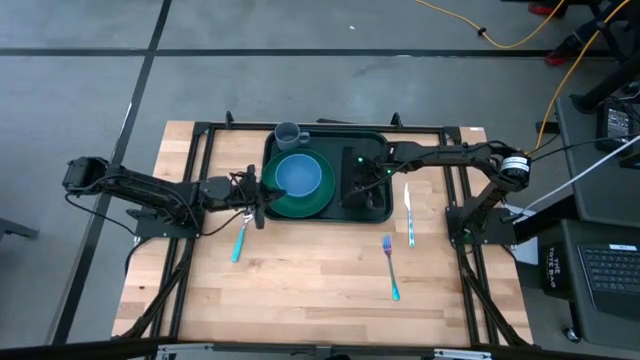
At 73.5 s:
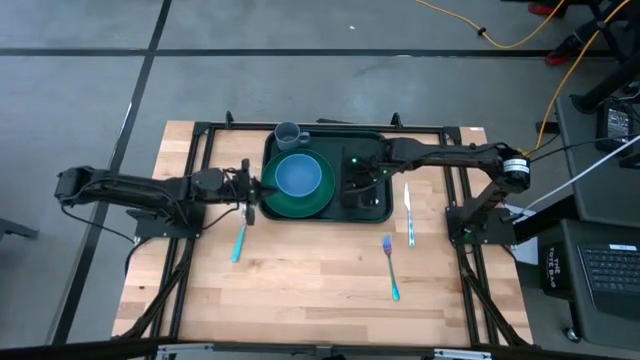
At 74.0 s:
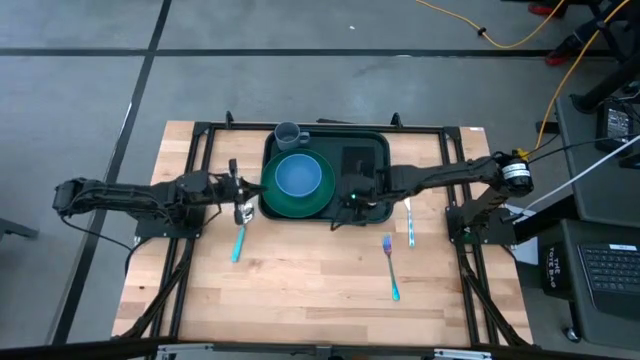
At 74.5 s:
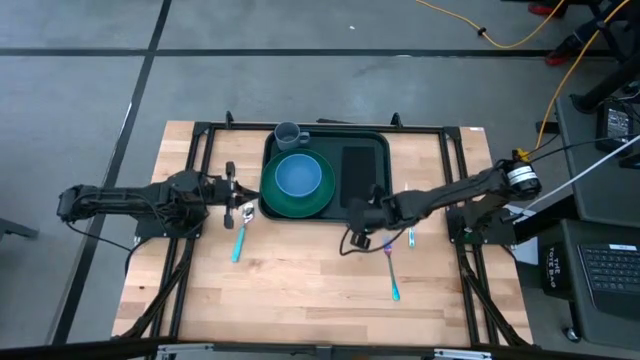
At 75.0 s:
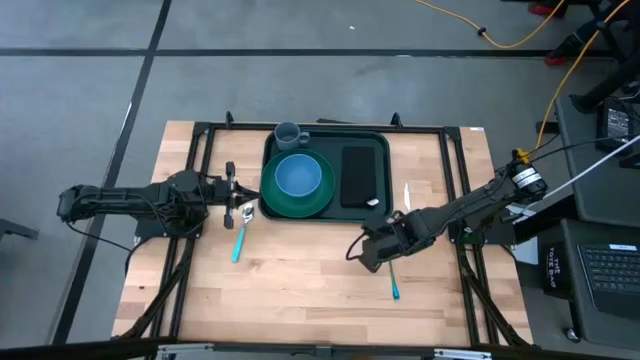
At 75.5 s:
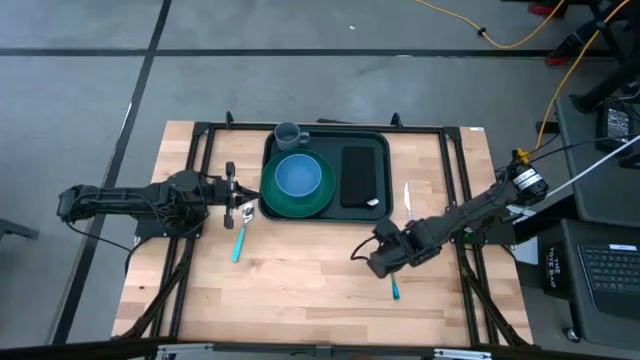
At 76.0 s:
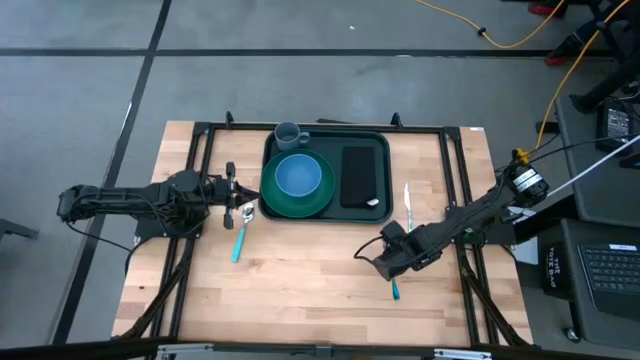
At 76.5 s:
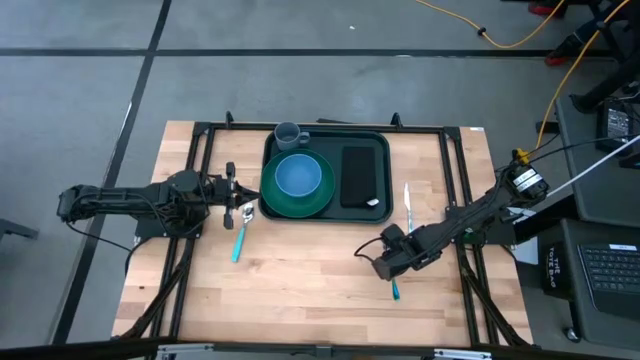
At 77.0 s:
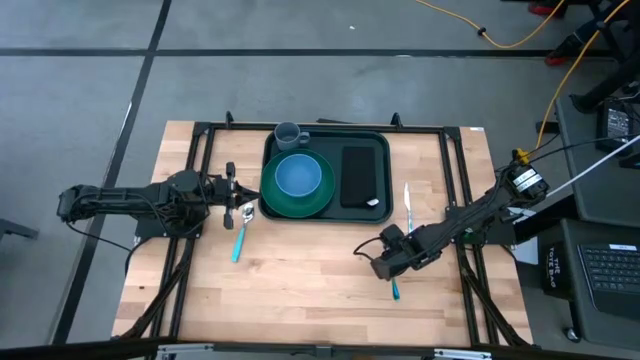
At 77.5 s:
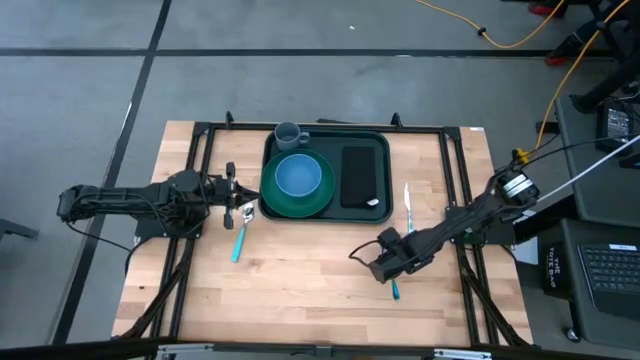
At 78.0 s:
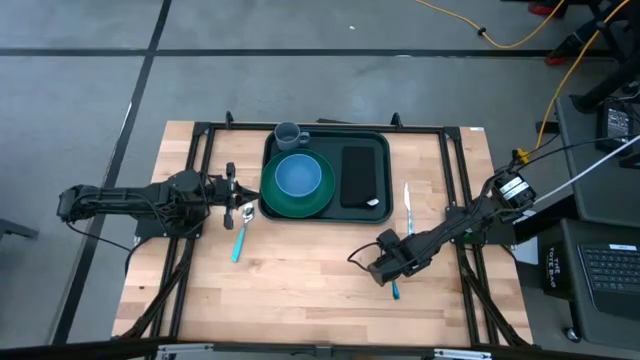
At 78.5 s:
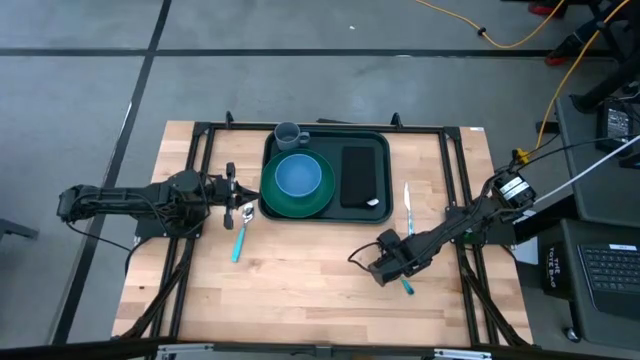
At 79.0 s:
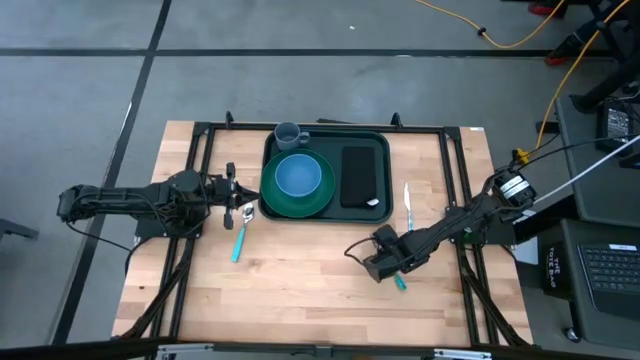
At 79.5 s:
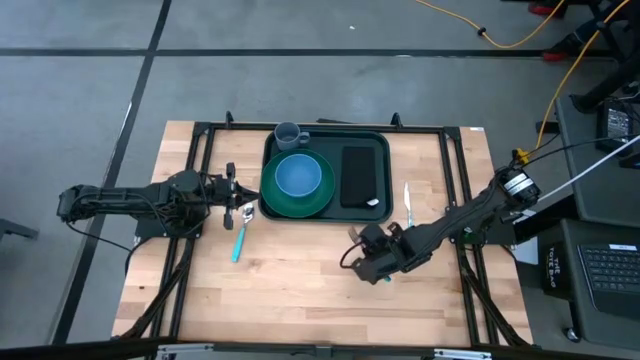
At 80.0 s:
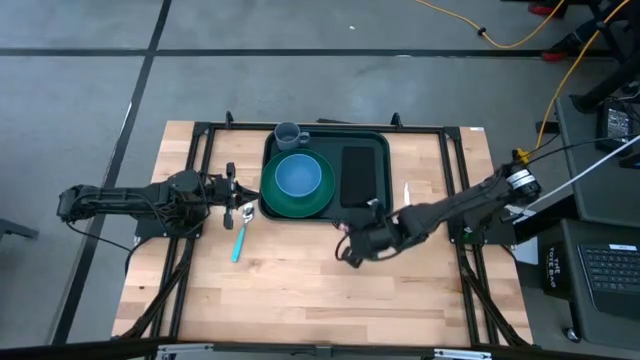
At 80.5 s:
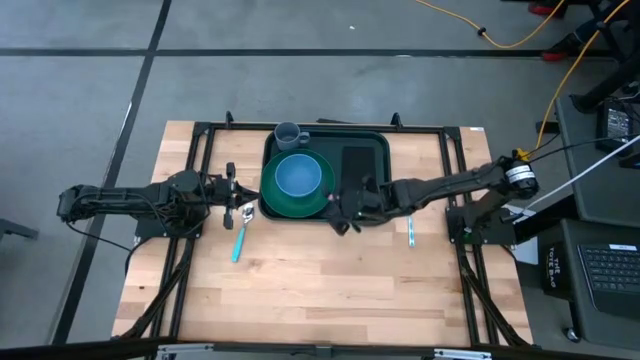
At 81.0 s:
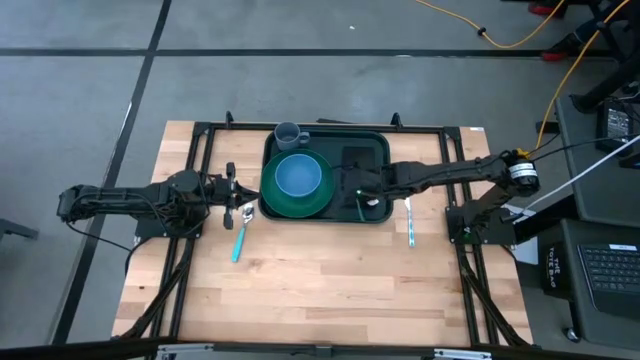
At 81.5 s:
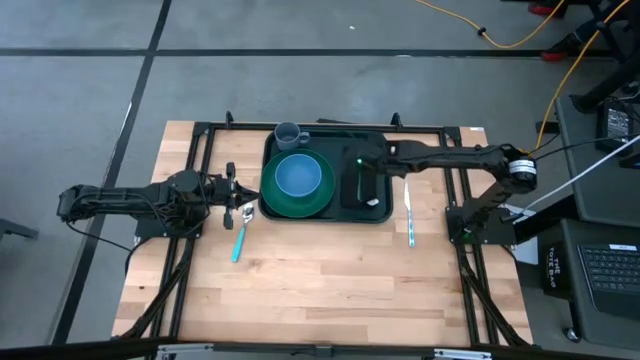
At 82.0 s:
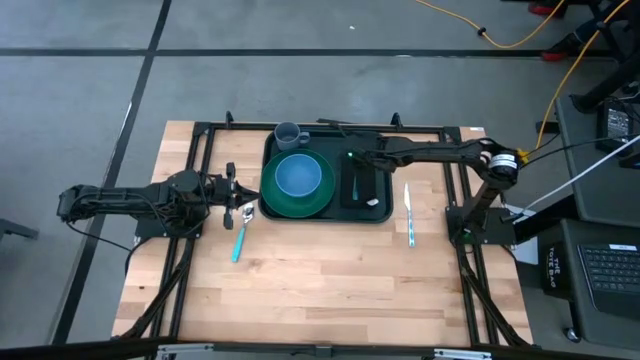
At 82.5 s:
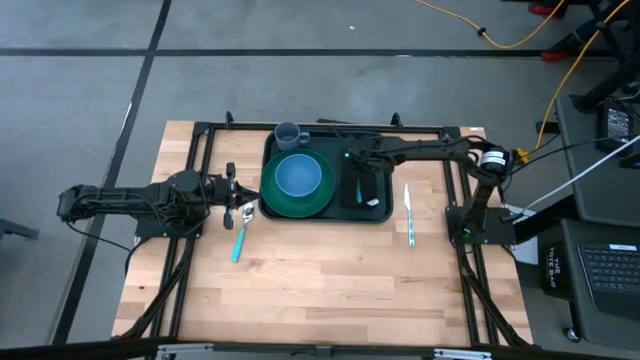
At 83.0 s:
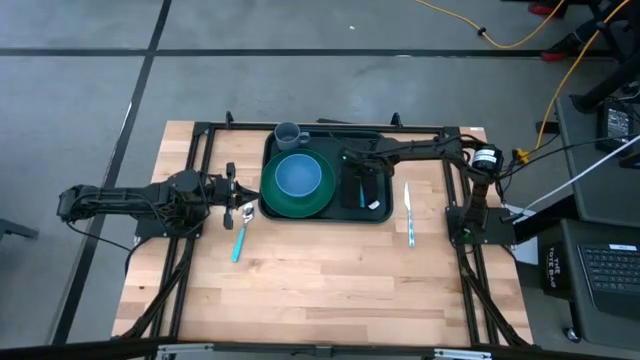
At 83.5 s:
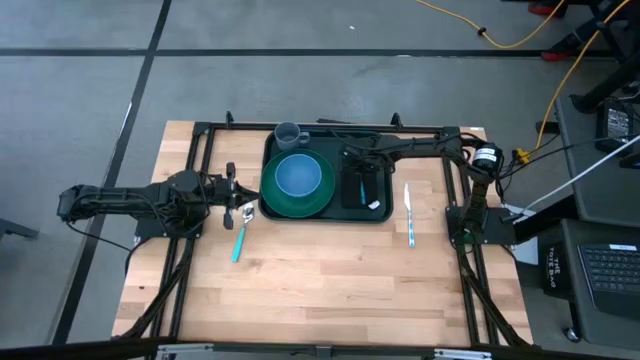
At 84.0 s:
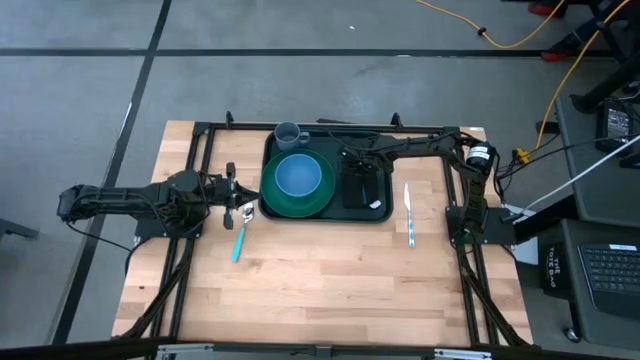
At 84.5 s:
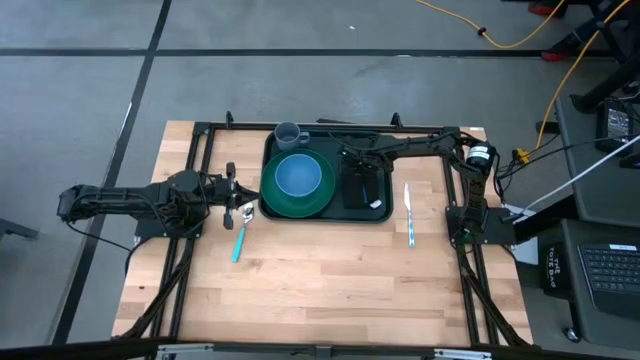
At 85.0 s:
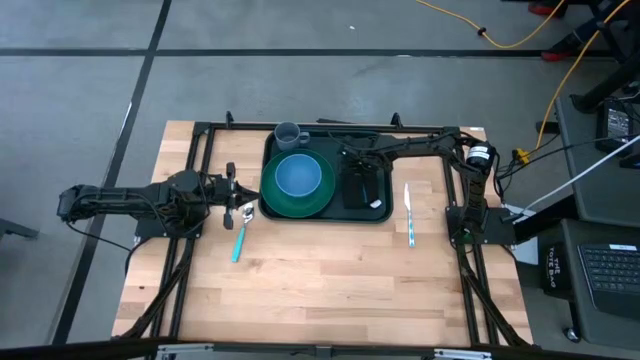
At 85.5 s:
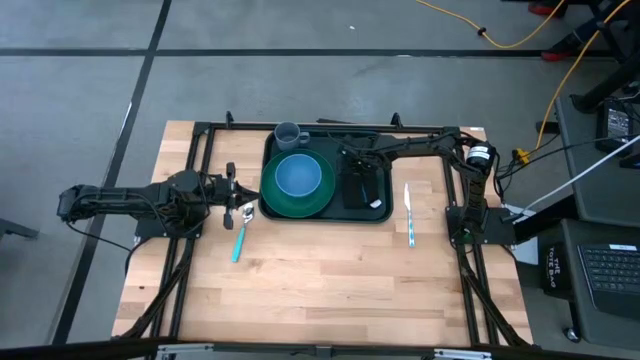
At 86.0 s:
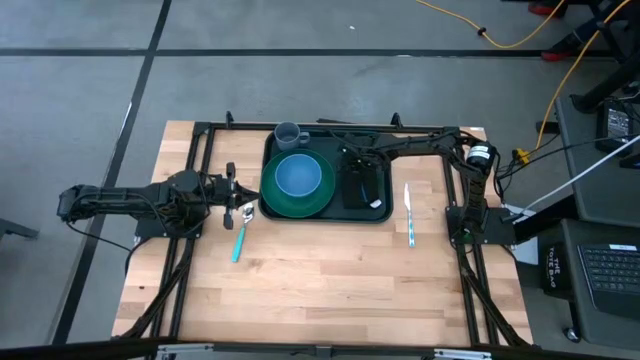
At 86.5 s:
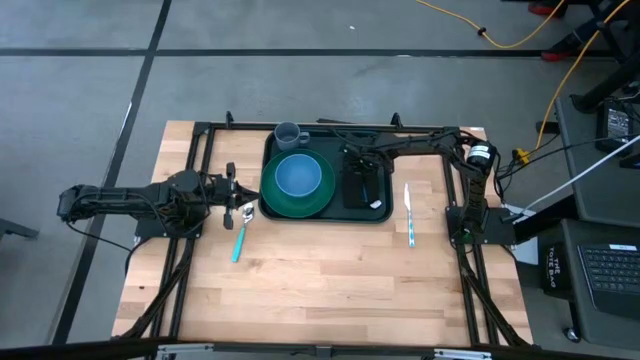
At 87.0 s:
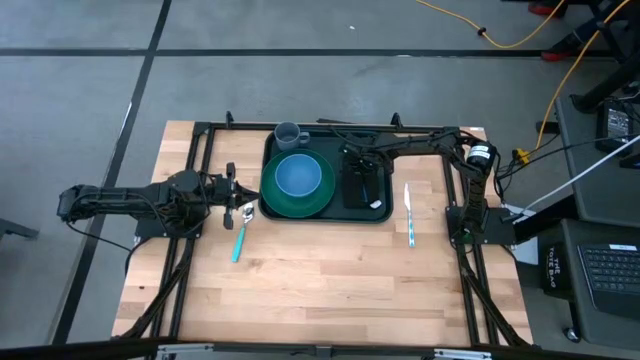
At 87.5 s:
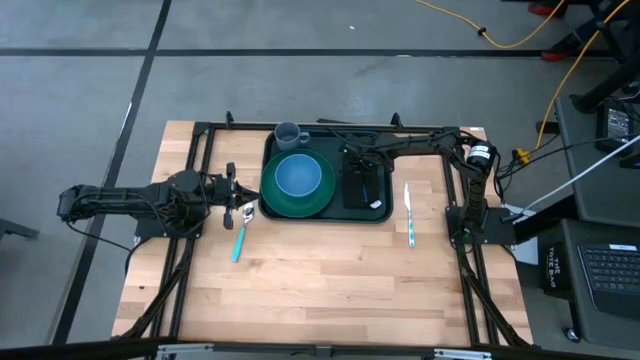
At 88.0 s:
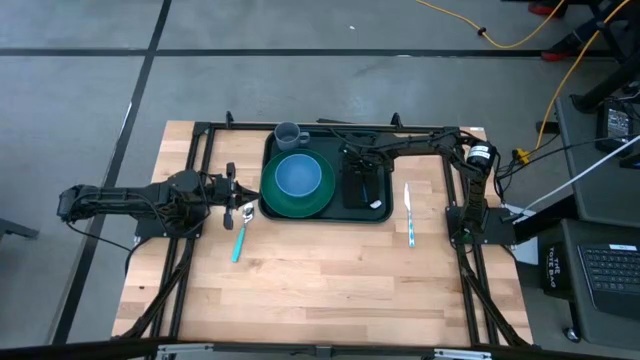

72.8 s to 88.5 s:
Task: Set up tray
Put the blue fork on the black napkin

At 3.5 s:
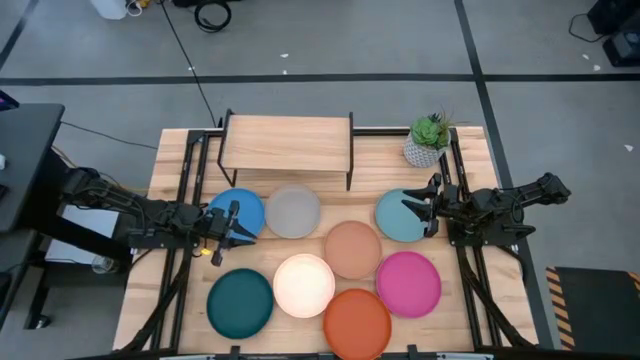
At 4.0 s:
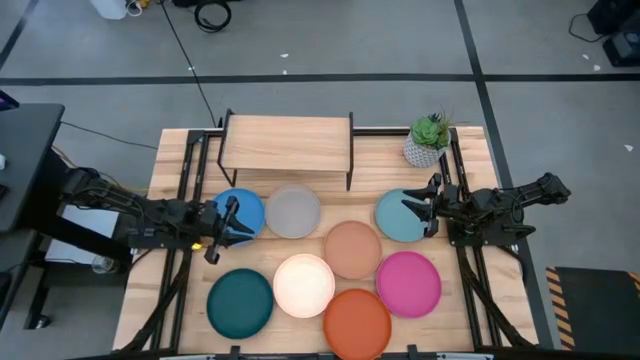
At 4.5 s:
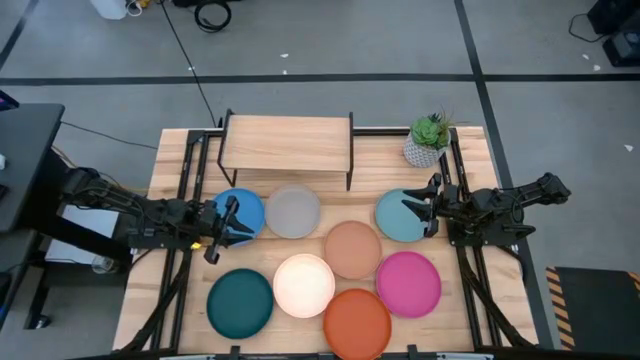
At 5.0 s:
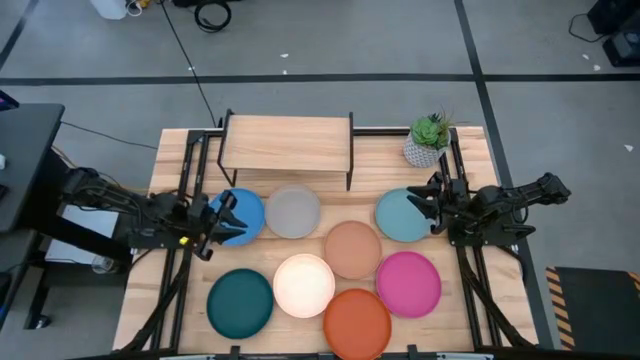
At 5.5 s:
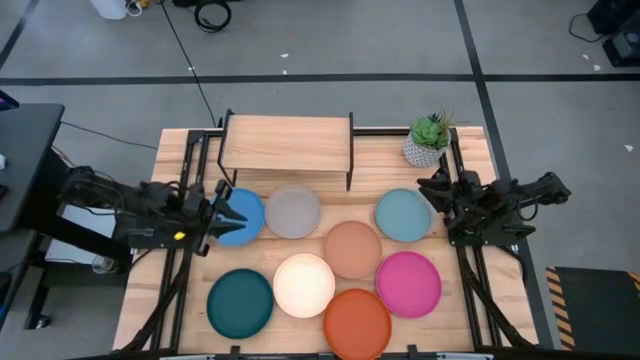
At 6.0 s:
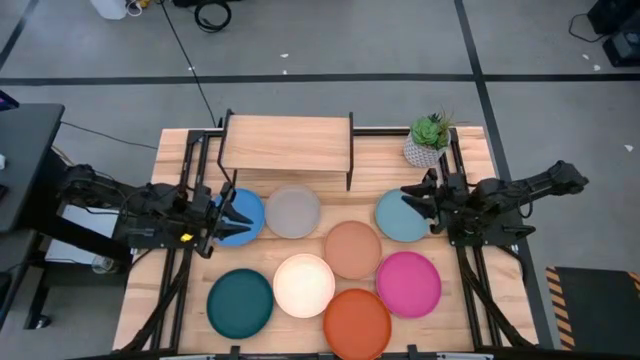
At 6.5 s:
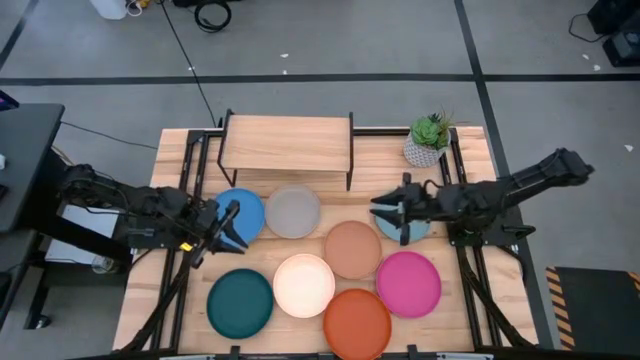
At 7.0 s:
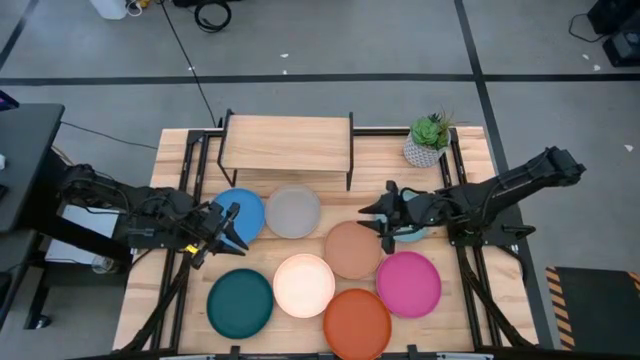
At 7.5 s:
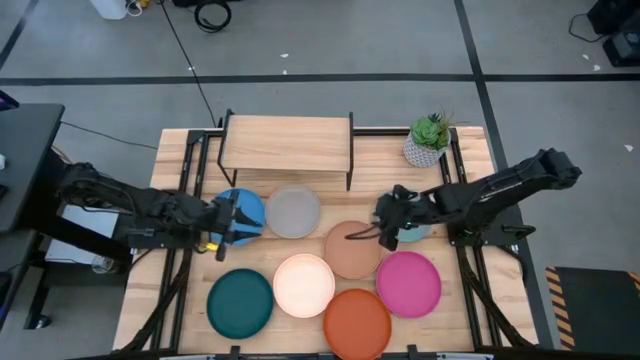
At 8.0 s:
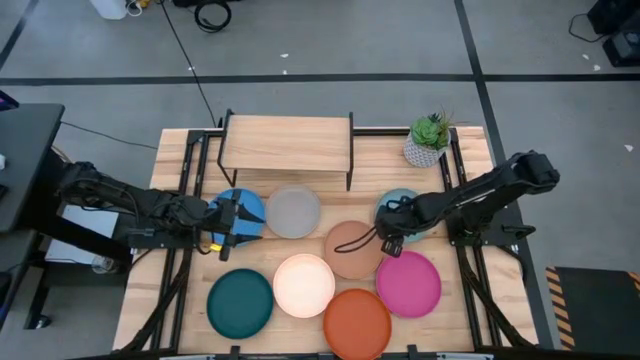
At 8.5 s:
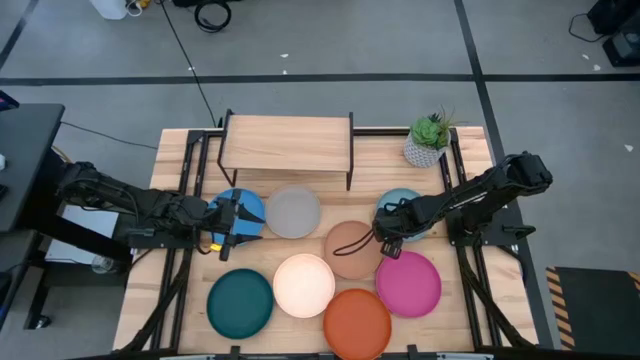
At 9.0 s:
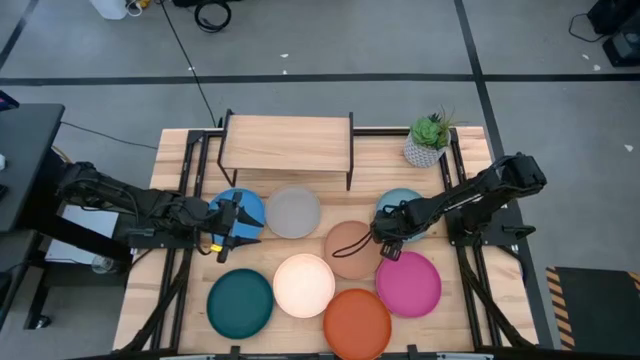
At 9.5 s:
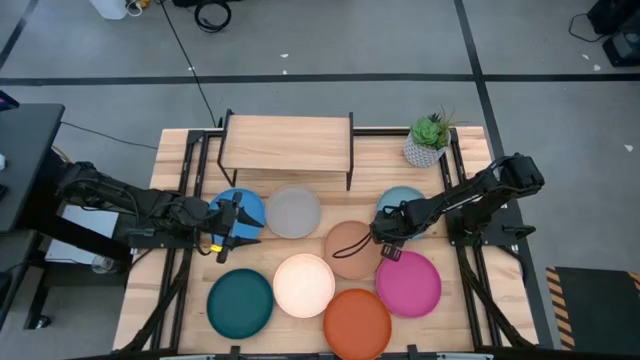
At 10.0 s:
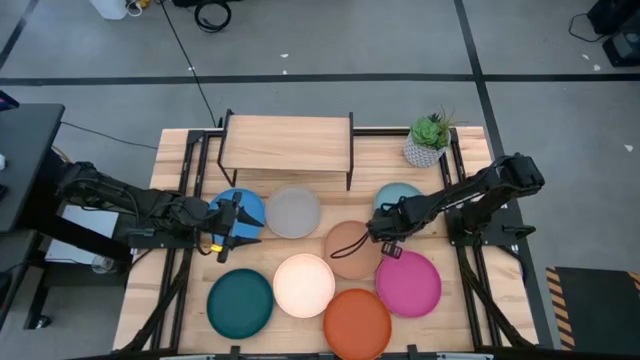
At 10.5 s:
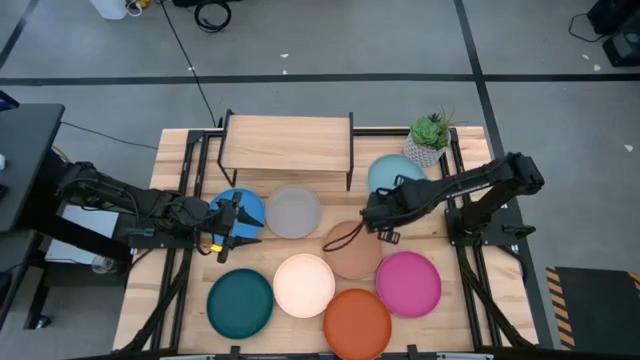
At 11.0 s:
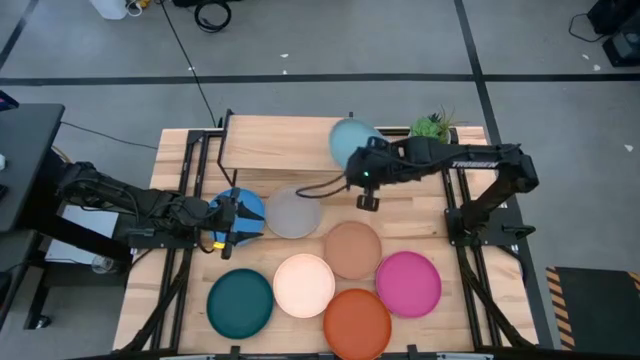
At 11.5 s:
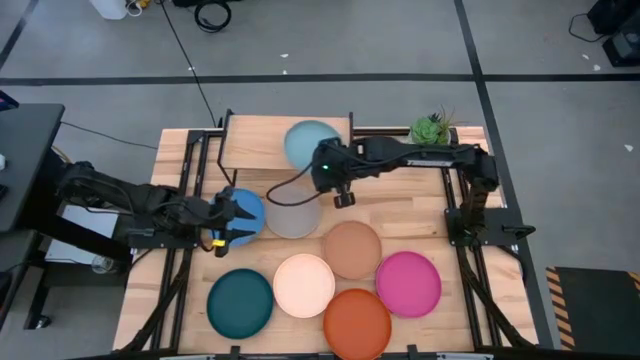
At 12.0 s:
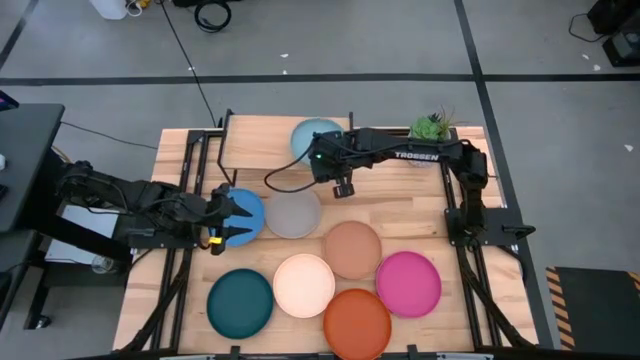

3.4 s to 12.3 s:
Task: Place and stack plates onto a shelf
Put the light blue plate on the shelf
